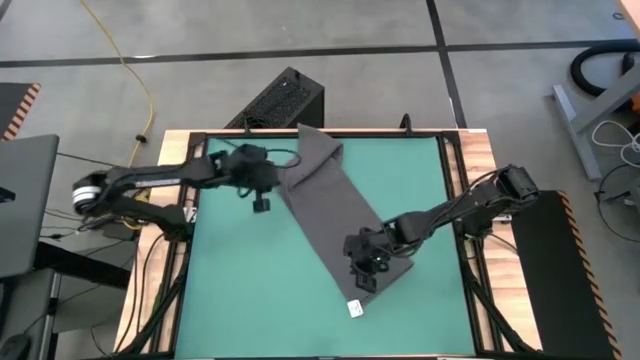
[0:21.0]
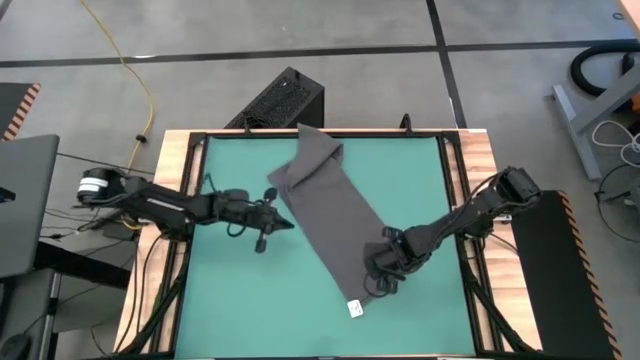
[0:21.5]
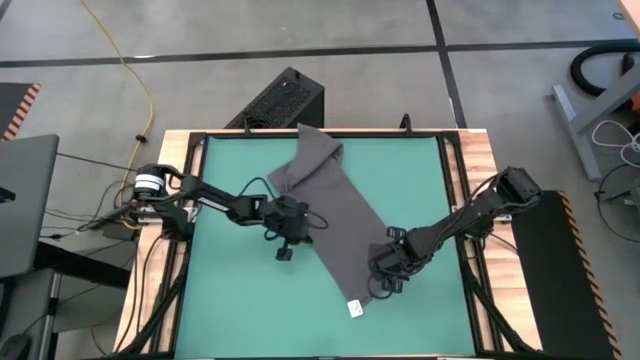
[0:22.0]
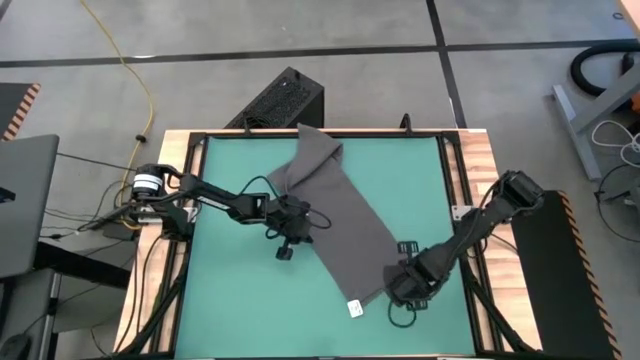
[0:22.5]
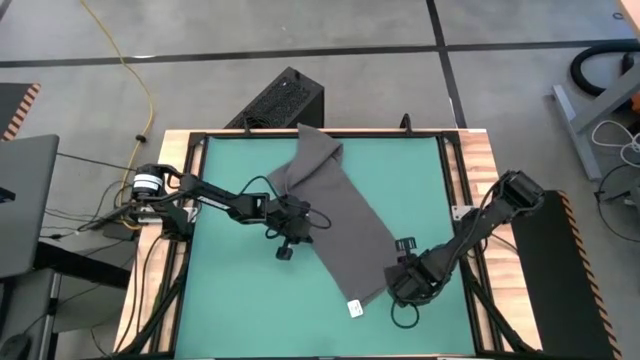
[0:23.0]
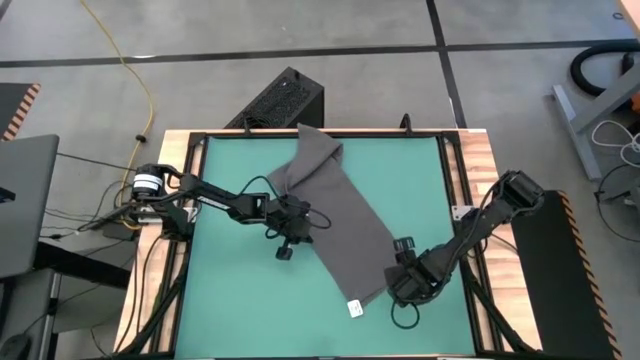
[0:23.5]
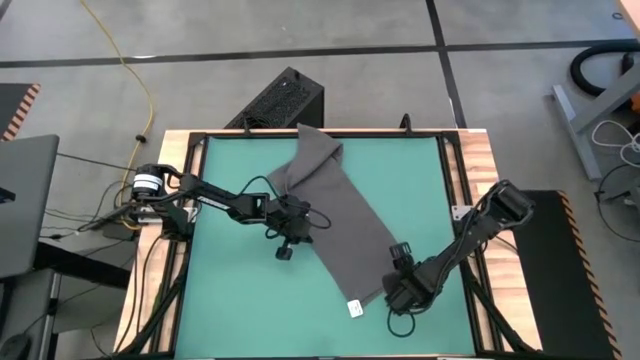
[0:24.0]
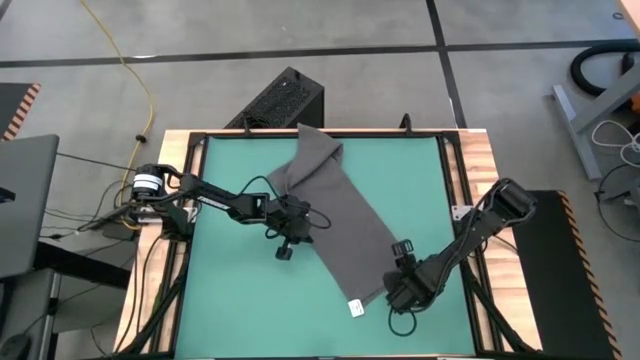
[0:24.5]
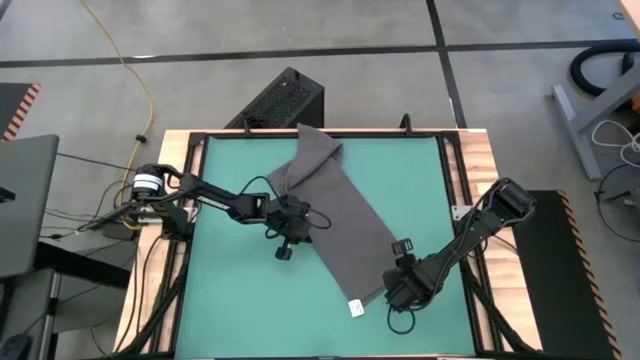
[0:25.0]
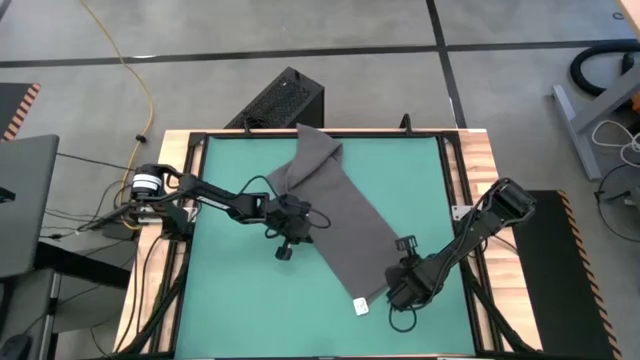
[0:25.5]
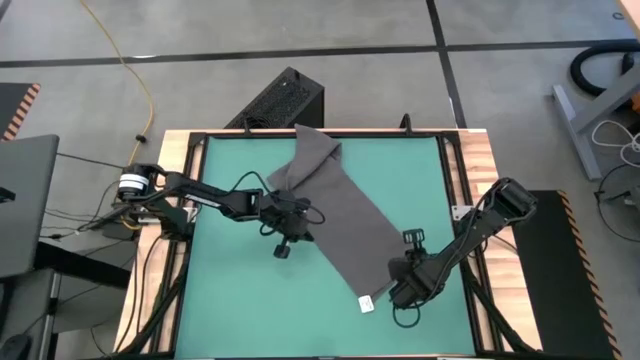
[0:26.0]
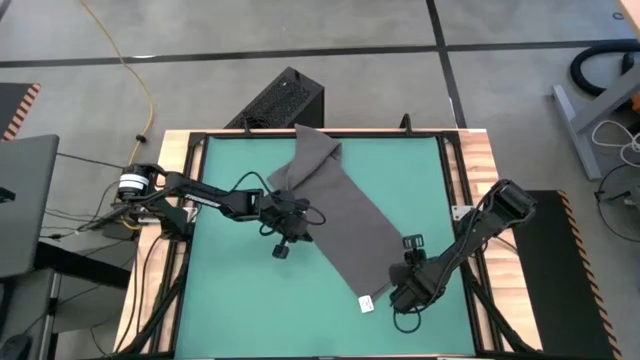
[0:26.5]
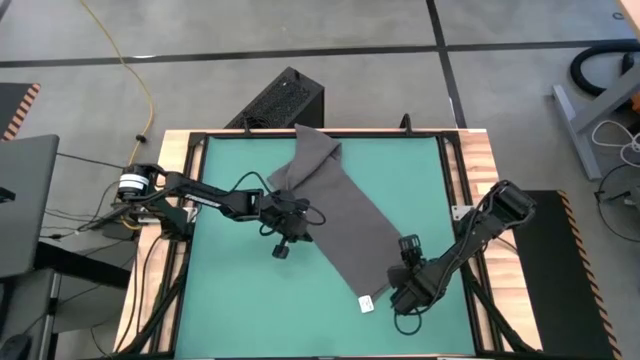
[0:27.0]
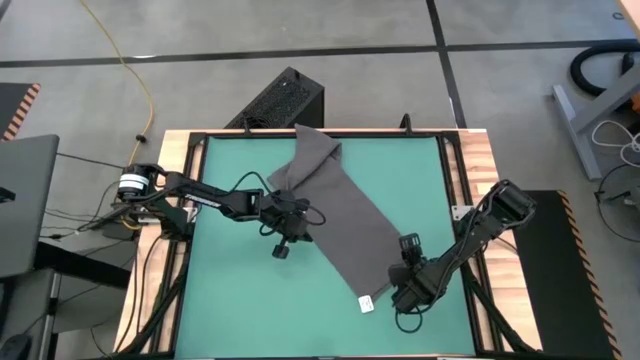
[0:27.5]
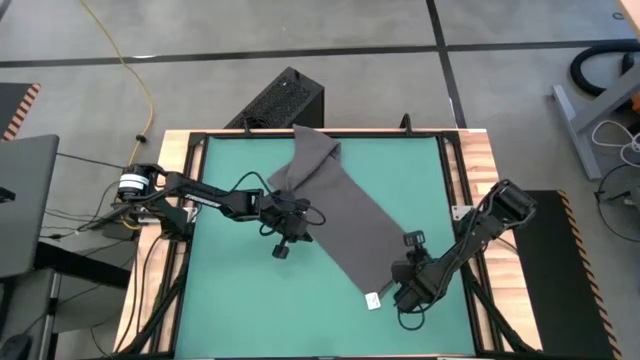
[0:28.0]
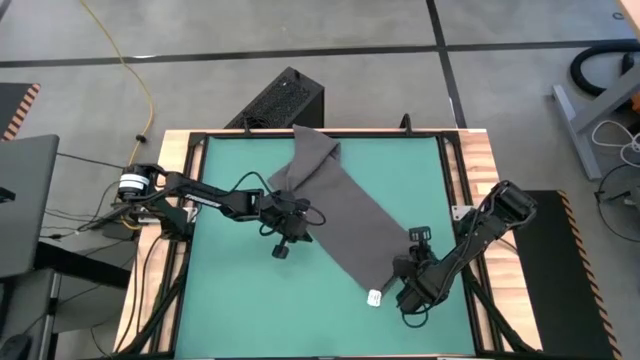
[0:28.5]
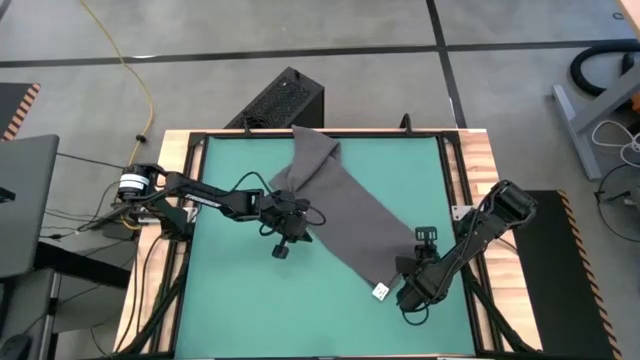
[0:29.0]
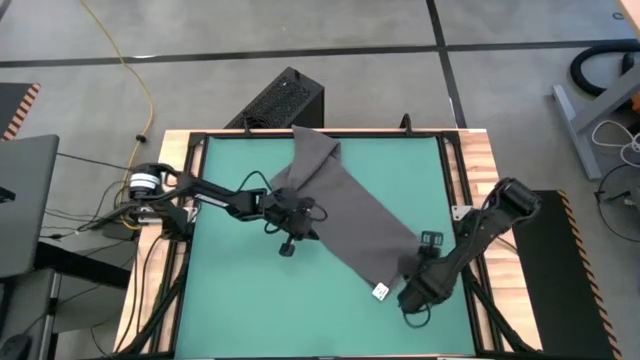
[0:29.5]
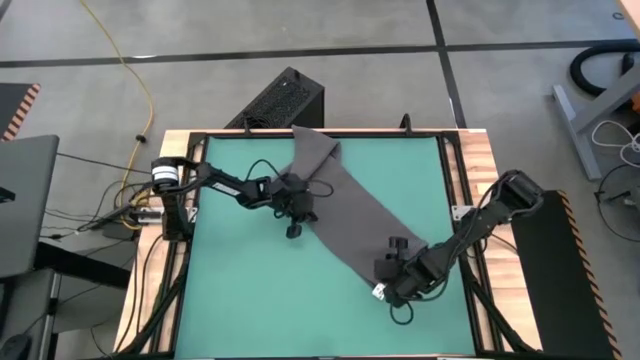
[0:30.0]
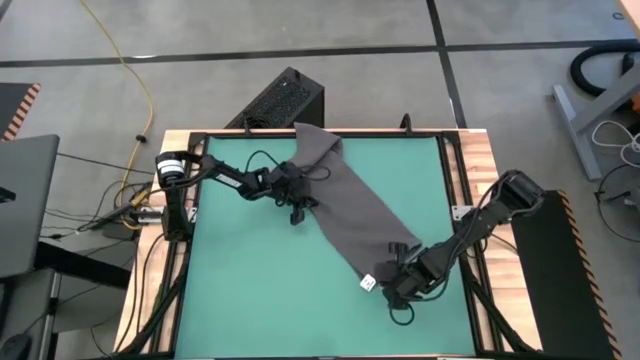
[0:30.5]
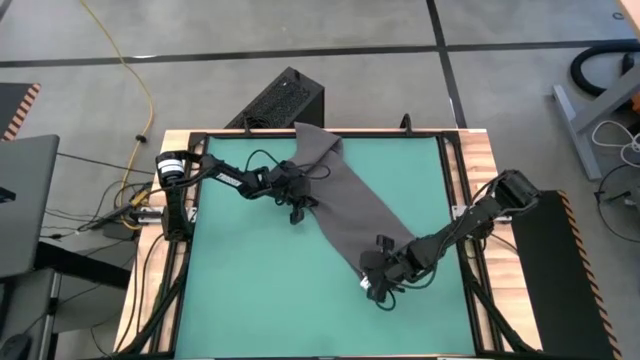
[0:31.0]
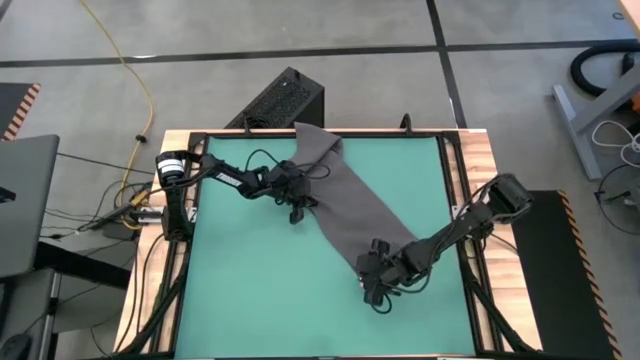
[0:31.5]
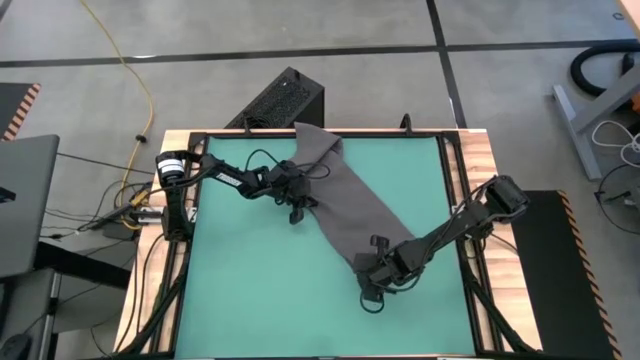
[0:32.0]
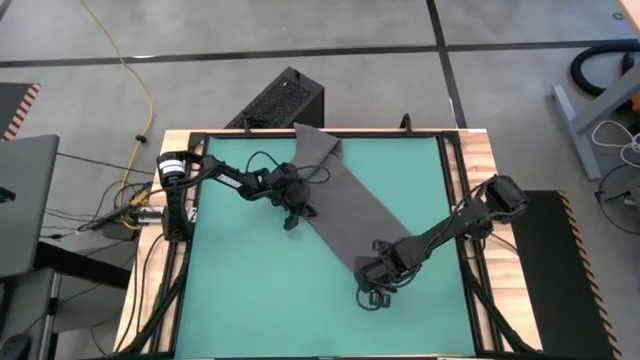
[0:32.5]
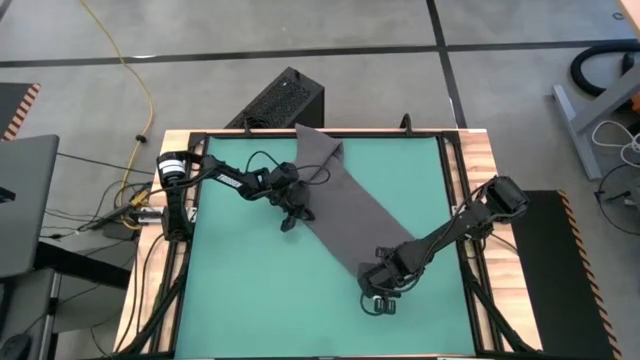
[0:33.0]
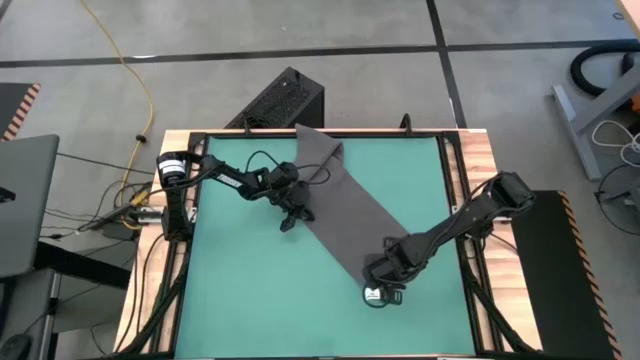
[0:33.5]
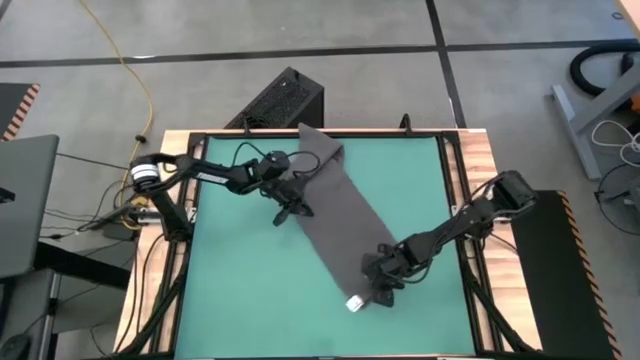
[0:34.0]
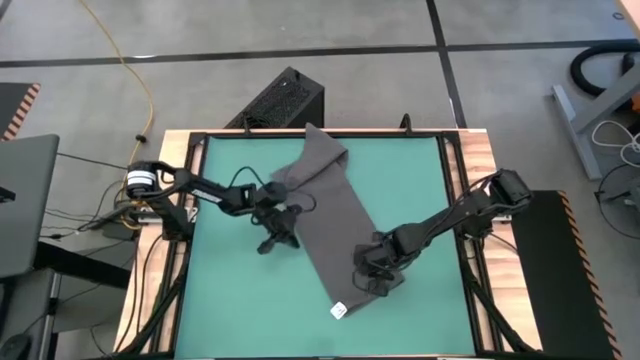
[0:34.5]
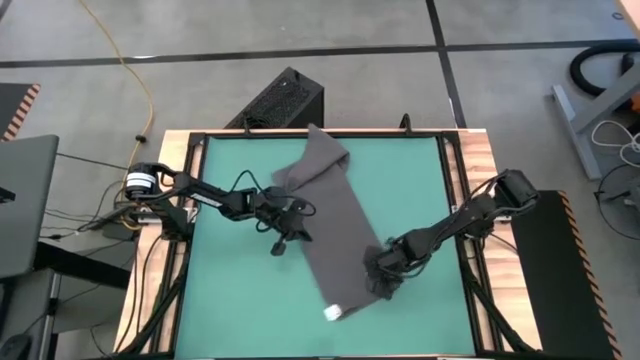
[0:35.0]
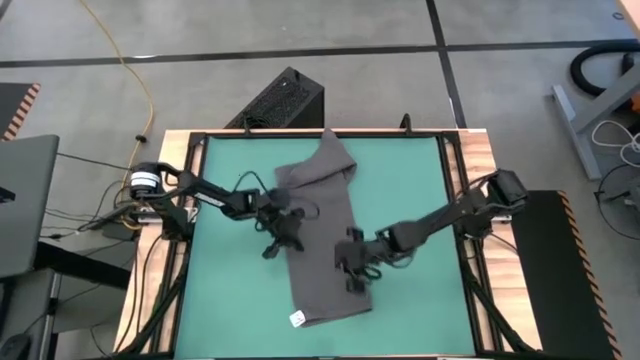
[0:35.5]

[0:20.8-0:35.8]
Task: Roll towel
Fold the gray towel

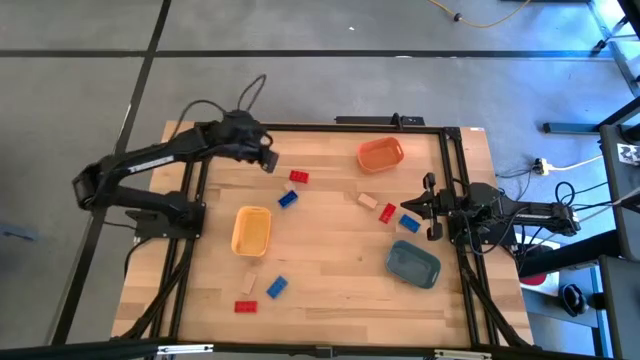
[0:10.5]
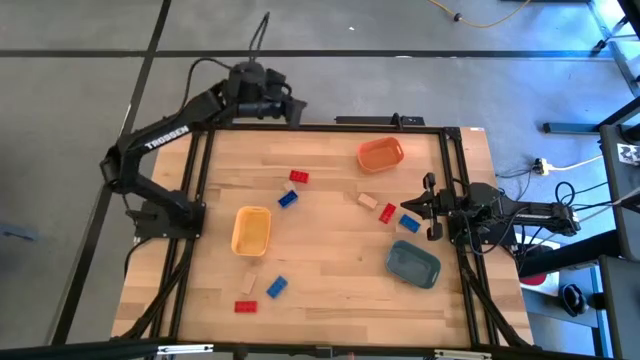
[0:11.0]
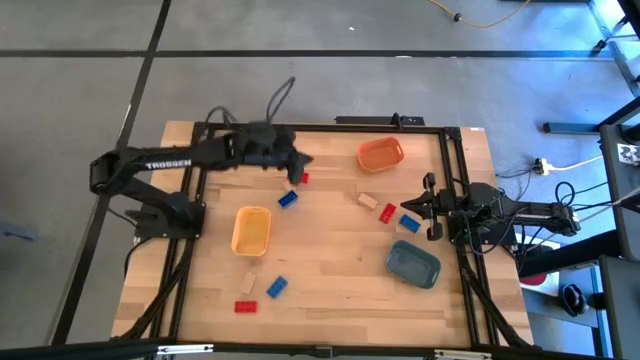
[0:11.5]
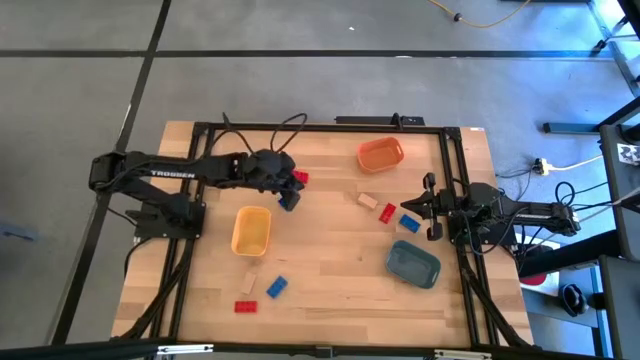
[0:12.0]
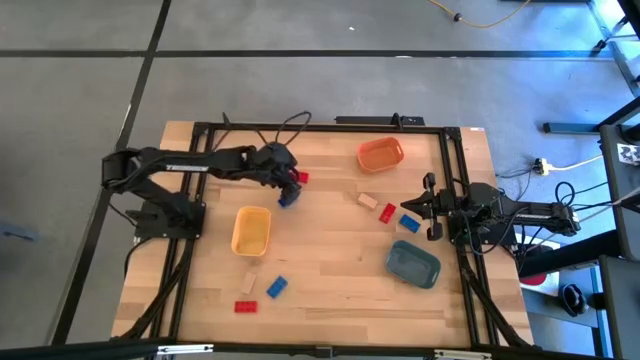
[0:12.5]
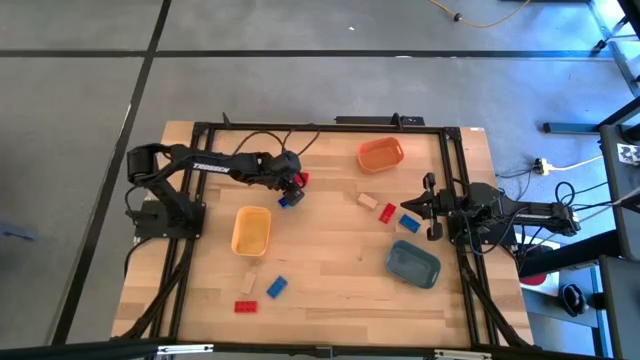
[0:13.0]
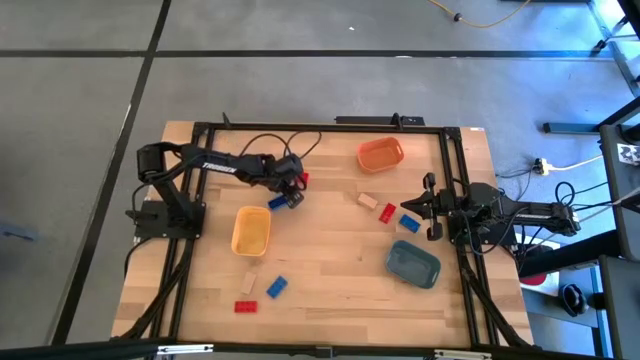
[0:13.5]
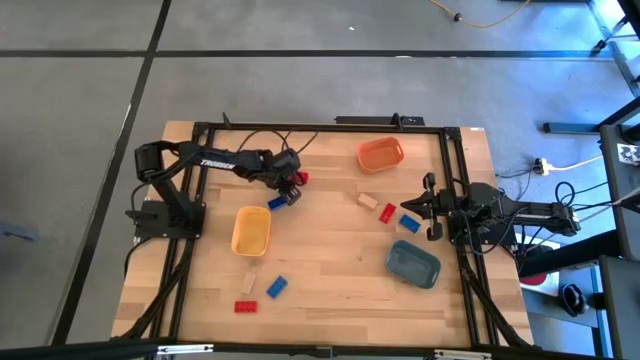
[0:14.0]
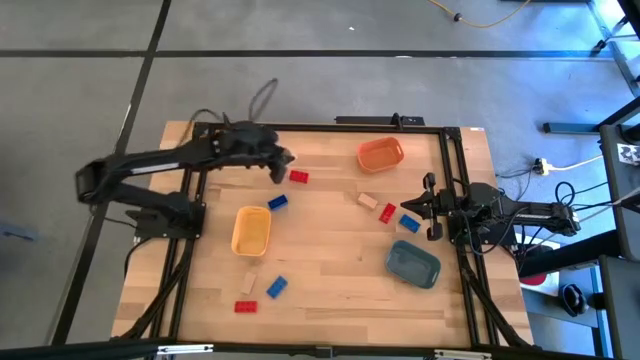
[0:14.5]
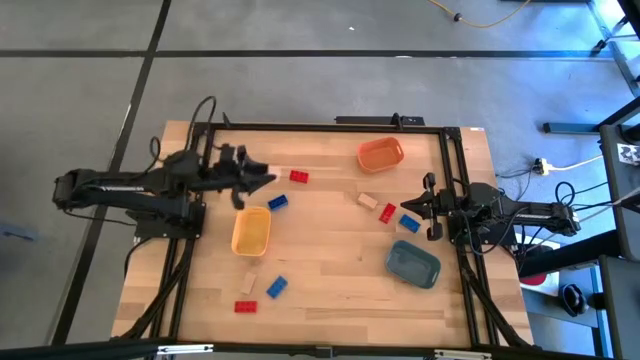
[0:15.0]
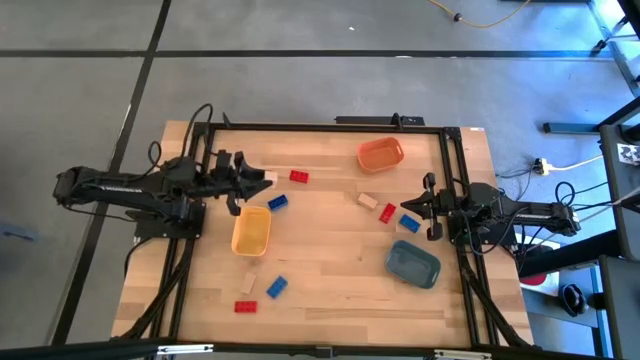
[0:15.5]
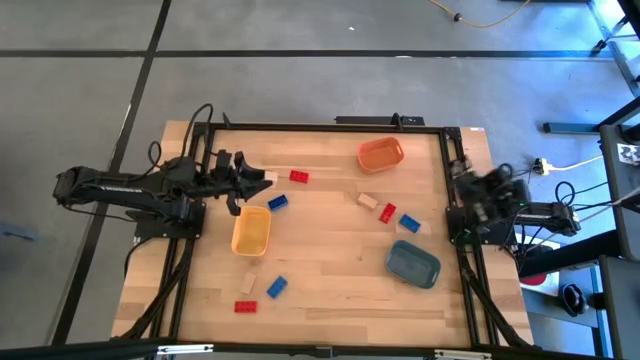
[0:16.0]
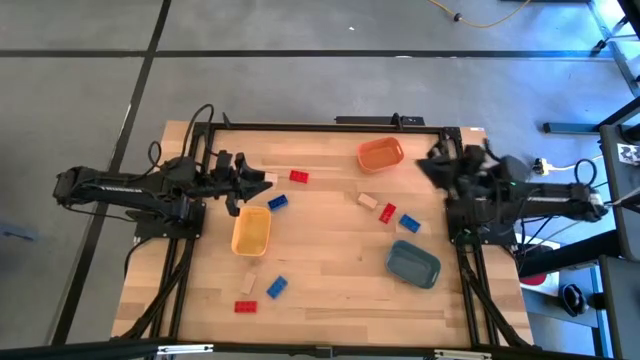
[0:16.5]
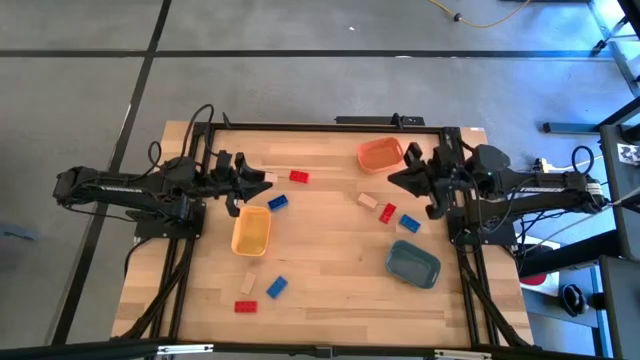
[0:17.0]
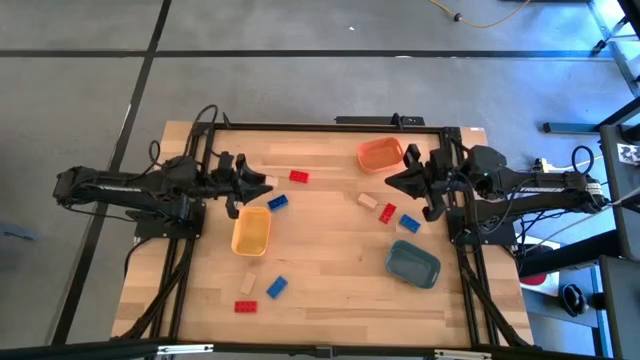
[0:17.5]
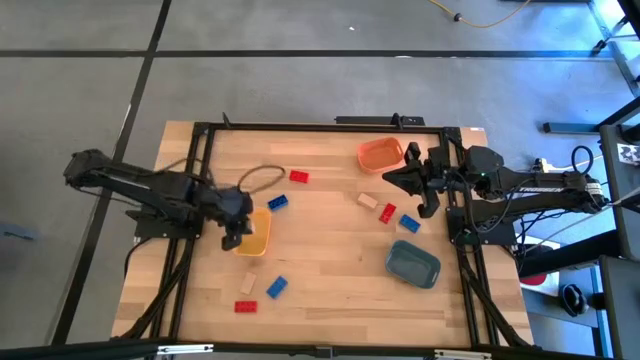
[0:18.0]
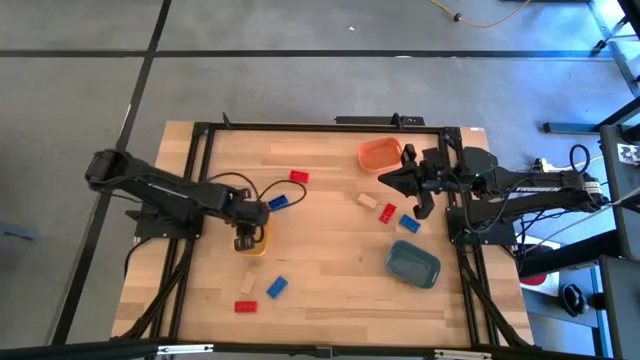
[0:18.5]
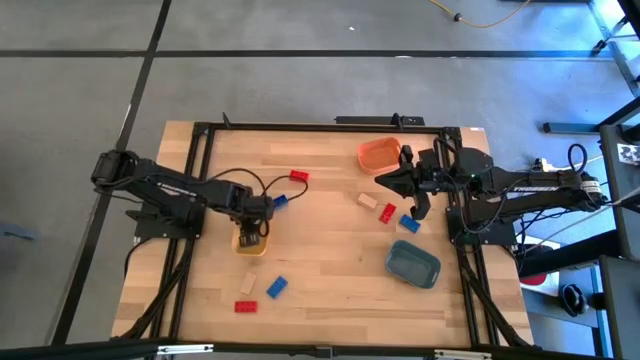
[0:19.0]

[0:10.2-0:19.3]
Task: Sort & place blocks by color
Put the top left brown block into the yellow bin
